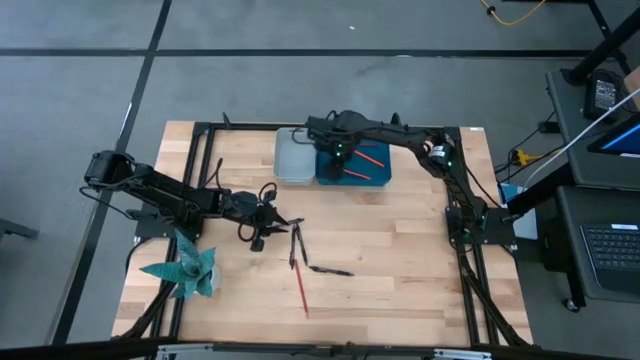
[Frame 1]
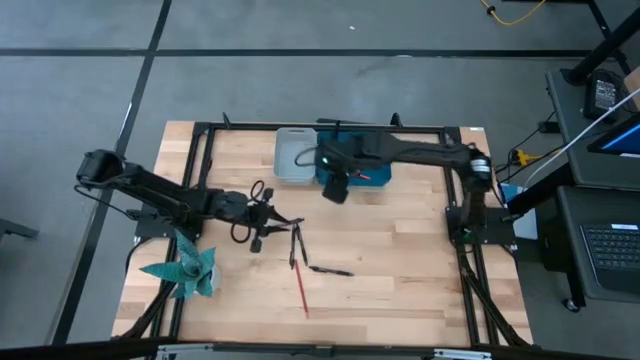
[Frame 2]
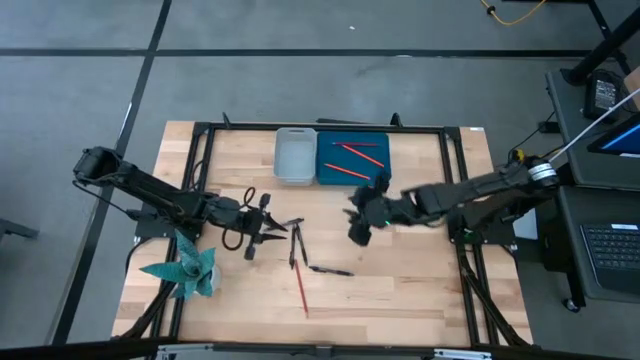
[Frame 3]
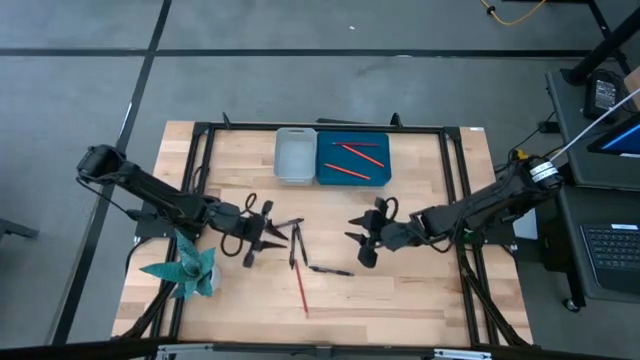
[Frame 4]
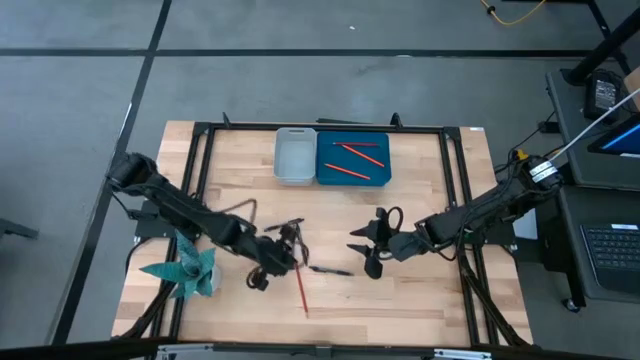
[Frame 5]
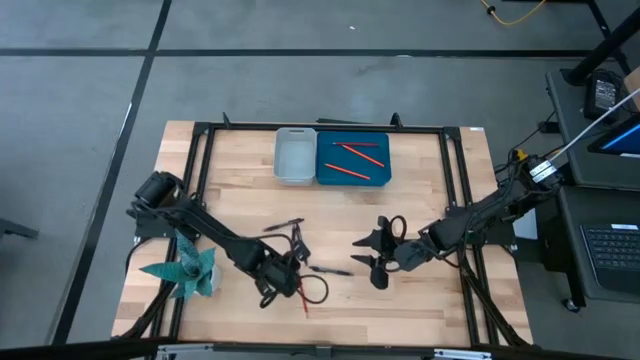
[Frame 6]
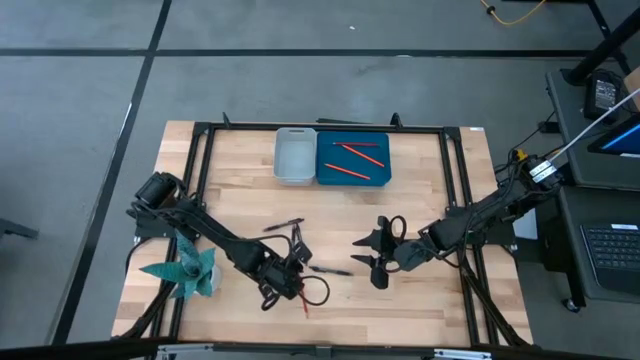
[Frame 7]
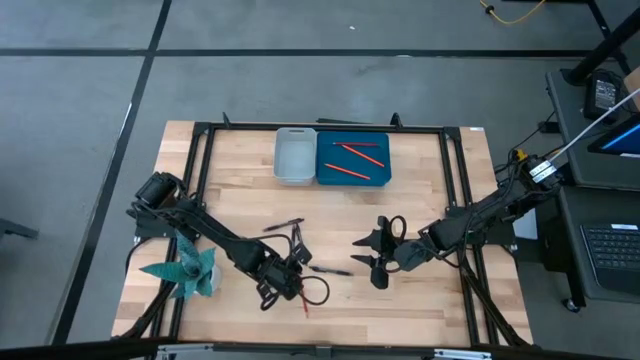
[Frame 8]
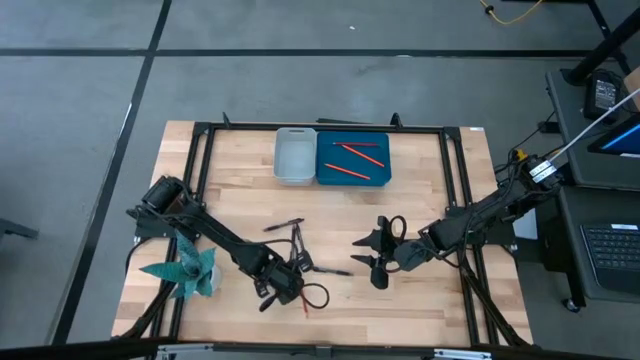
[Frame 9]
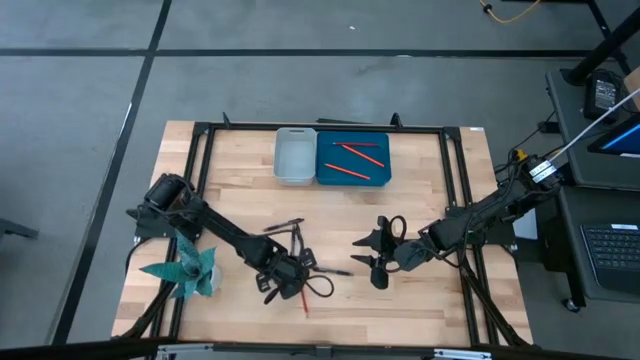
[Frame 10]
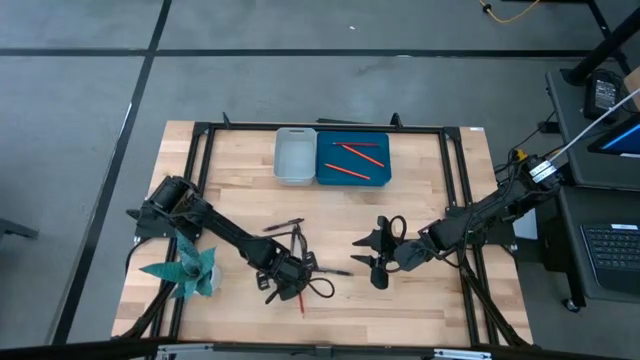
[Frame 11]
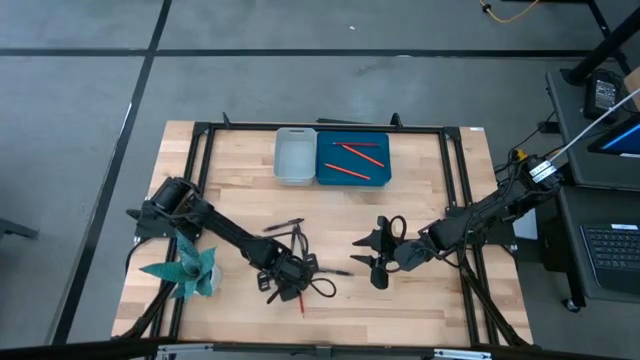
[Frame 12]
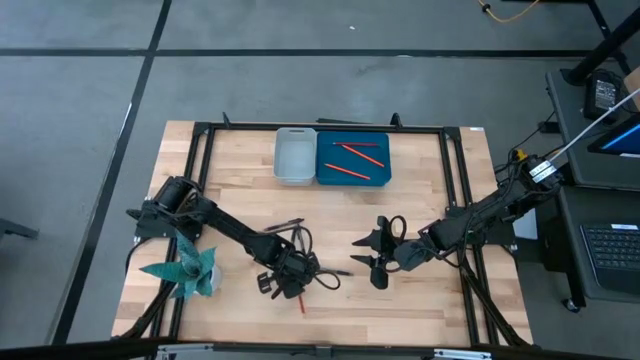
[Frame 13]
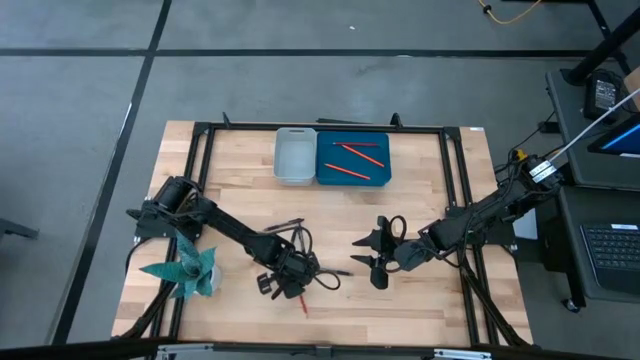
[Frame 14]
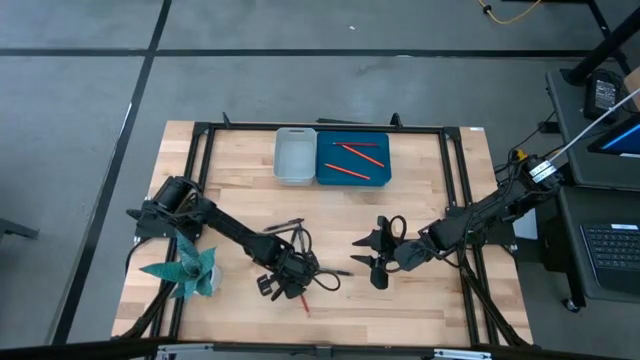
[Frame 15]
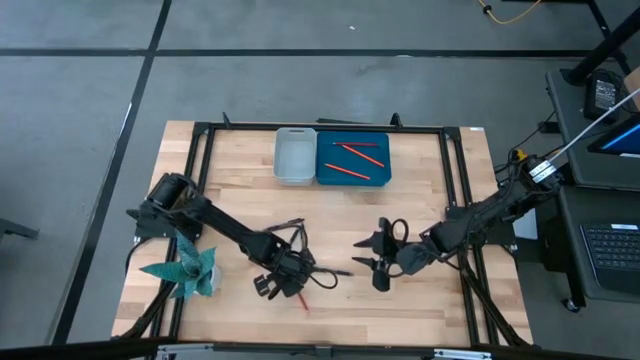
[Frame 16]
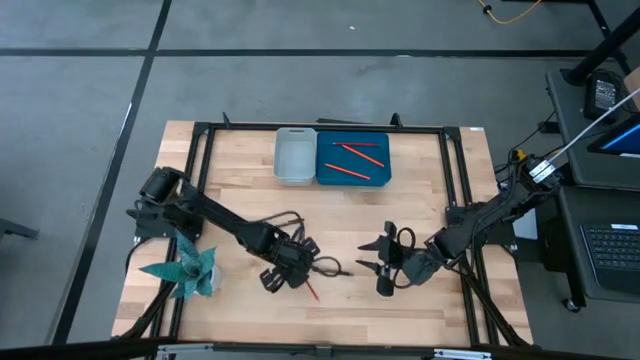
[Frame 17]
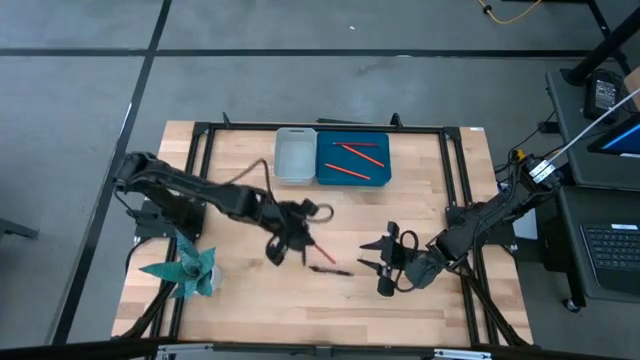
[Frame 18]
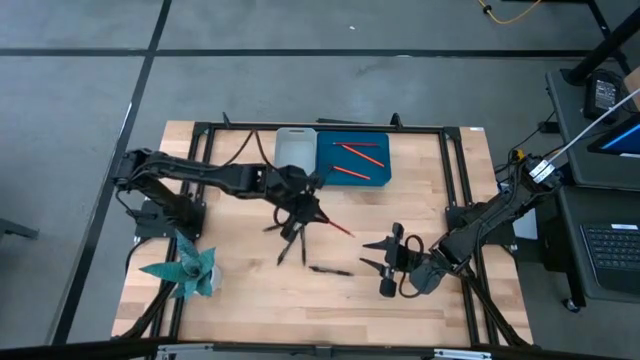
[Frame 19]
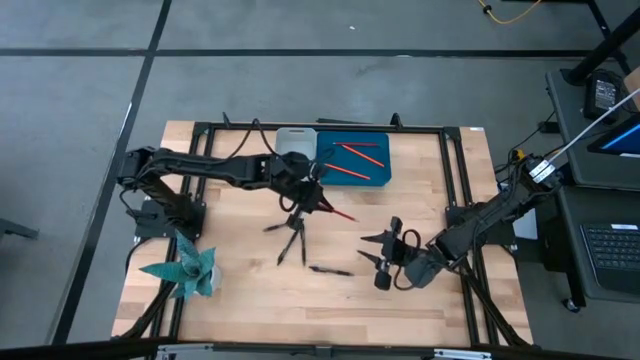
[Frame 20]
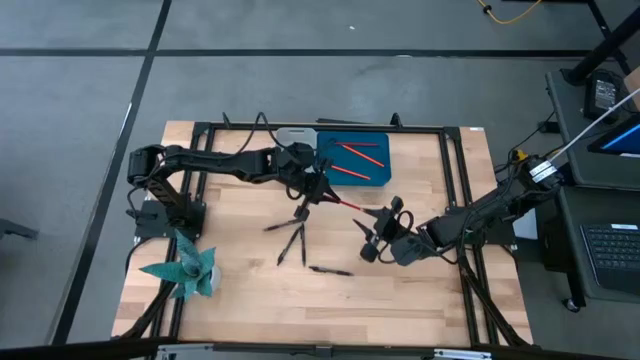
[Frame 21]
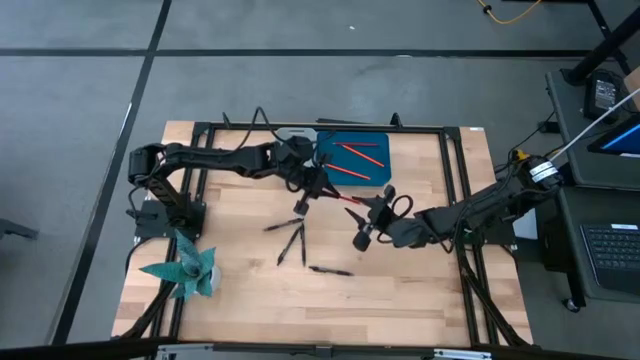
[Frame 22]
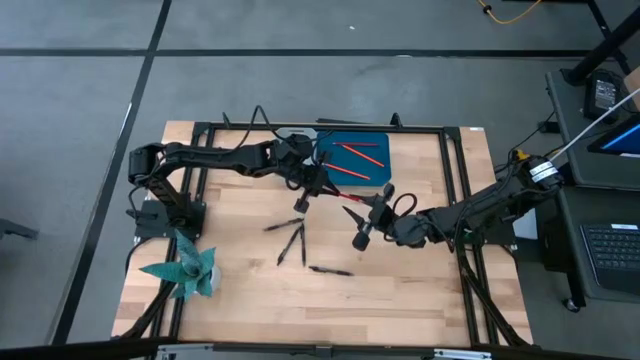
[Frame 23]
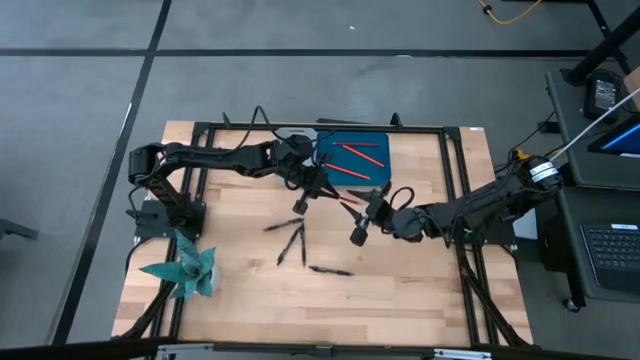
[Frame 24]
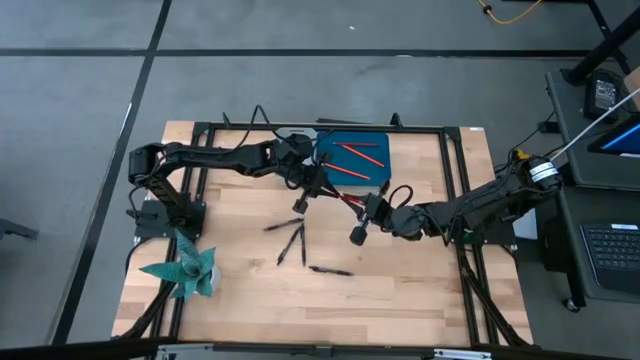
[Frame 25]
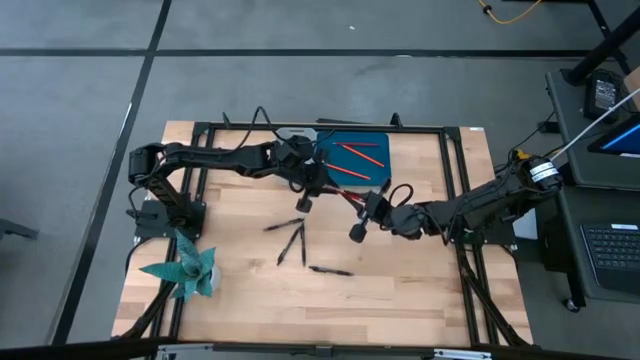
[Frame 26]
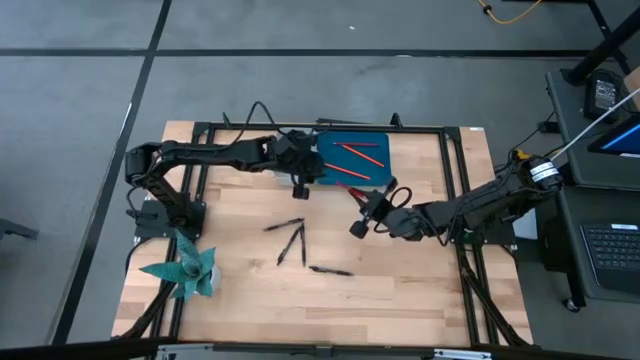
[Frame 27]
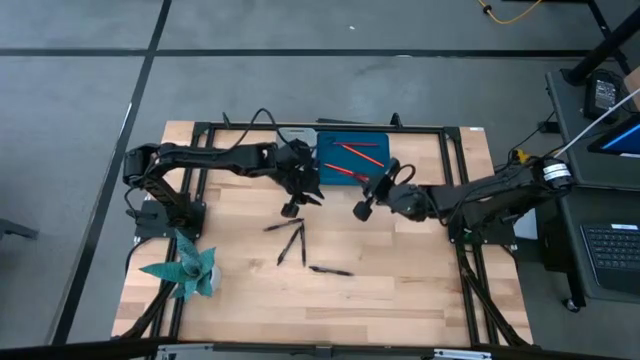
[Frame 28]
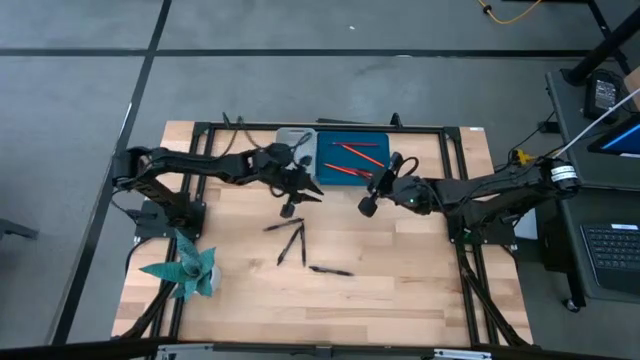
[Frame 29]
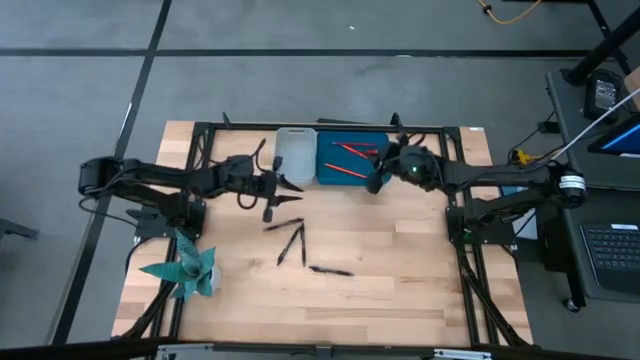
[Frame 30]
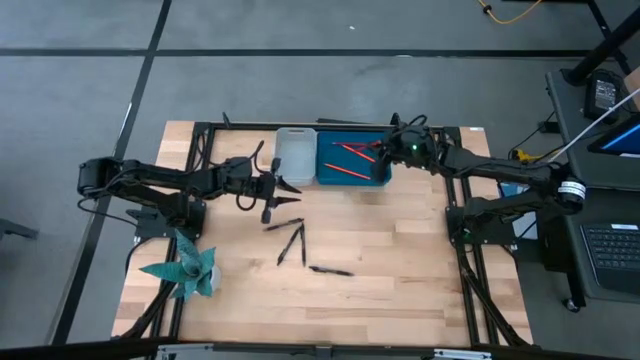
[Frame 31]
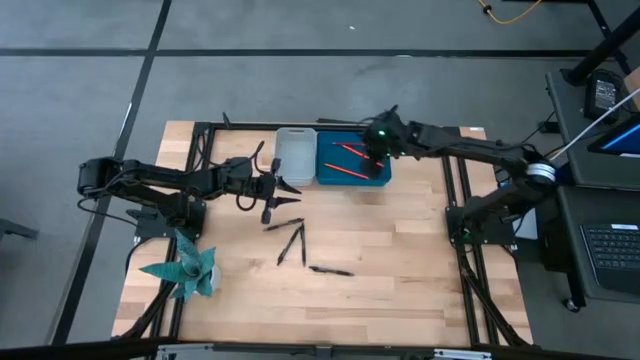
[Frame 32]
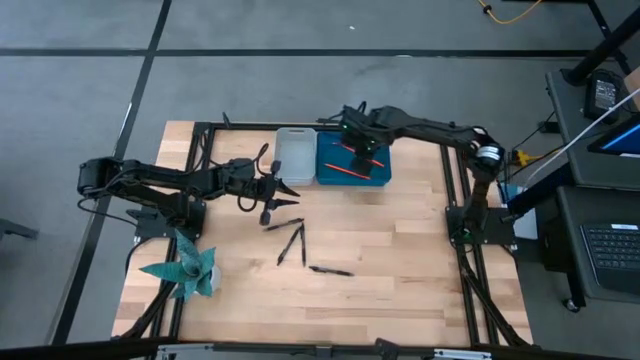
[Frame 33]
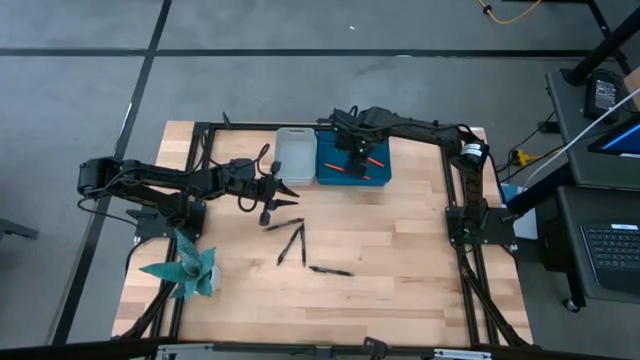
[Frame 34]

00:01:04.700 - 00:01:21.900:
Task: Sort pens & pencils
Put the red pencil into the blue bin

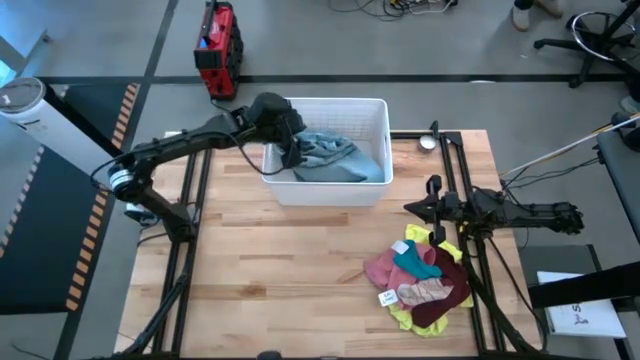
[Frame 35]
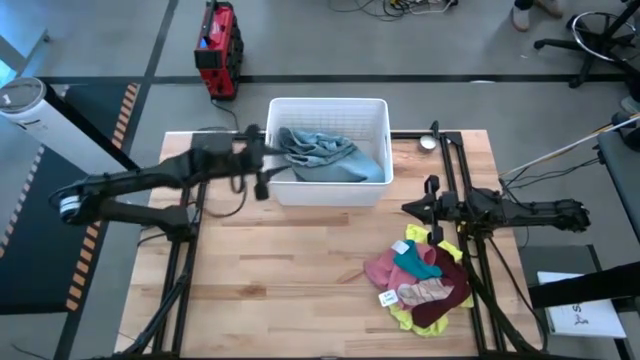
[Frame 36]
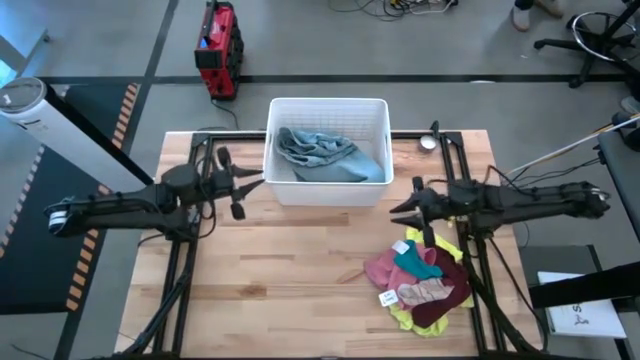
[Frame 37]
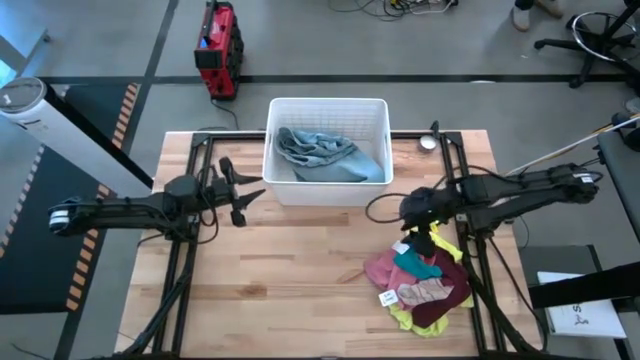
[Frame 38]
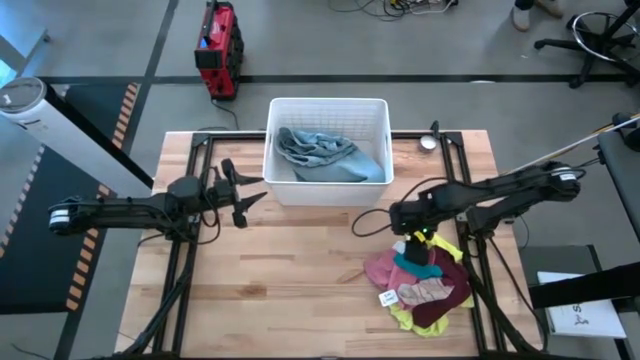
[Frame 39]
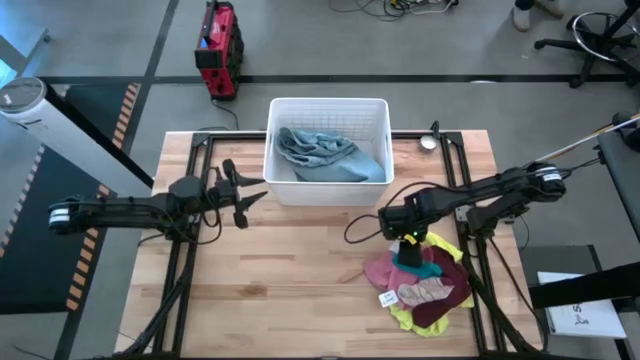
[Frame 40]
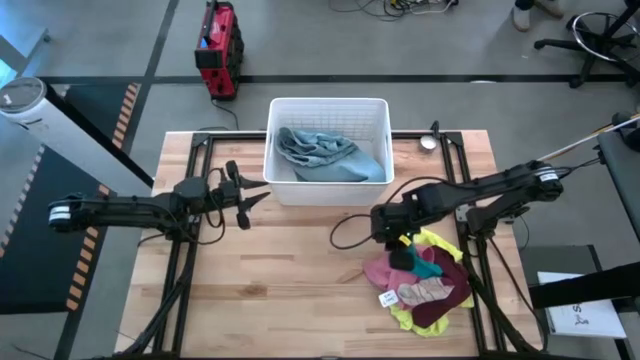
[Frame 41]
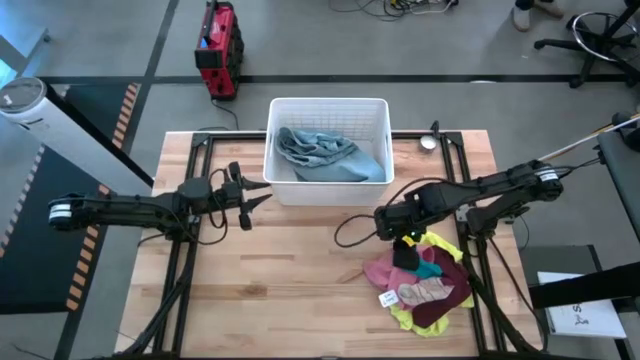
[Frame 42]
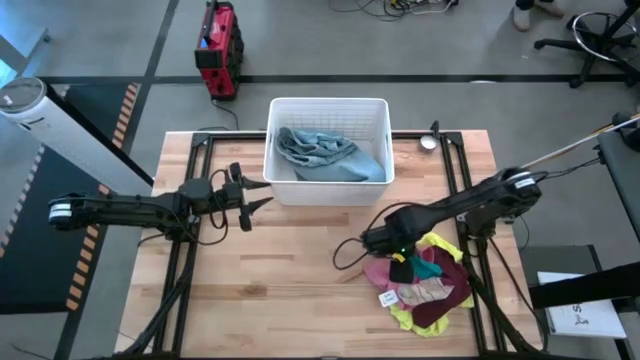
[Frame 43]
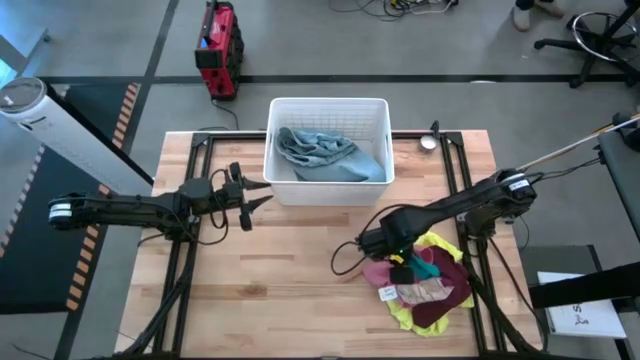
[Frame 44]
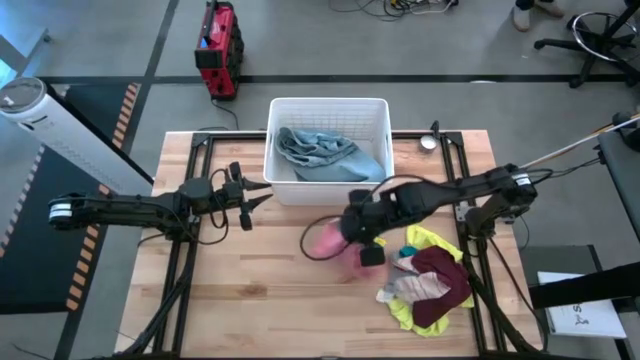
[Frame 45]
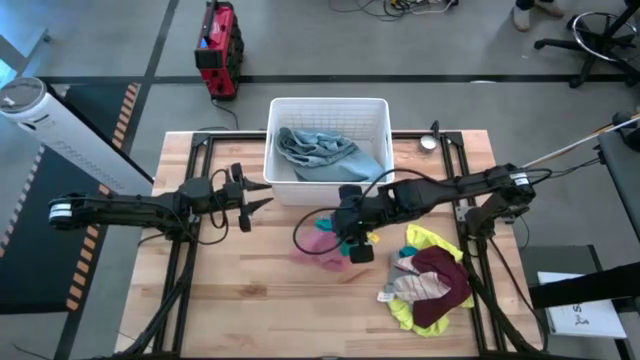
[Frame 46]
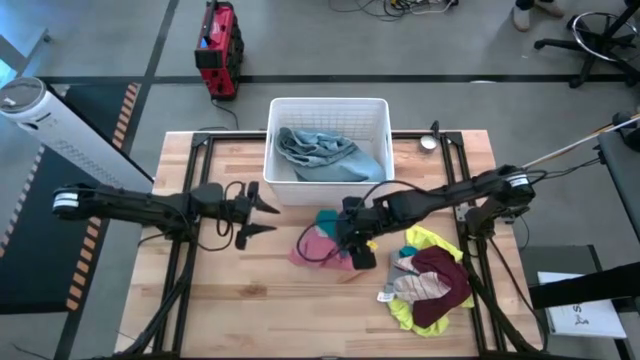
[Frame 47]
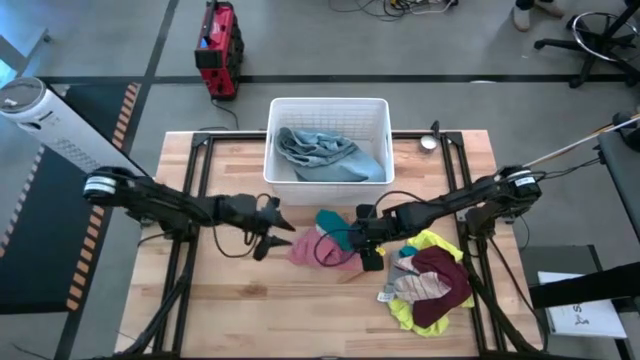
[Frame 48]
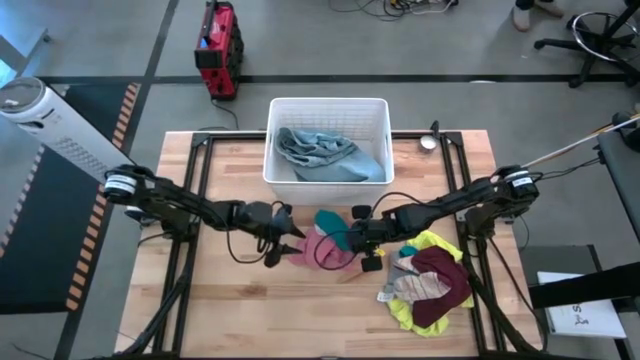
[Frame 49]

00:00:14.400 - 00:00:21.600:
Task: Sort clothes
Put the blue sock into the white laundry bin
